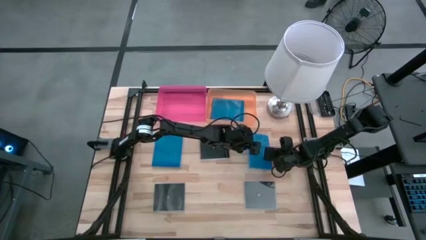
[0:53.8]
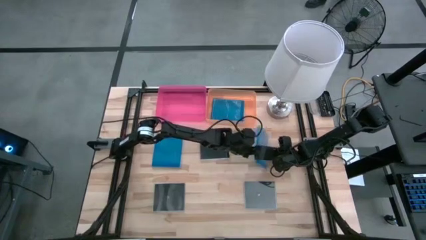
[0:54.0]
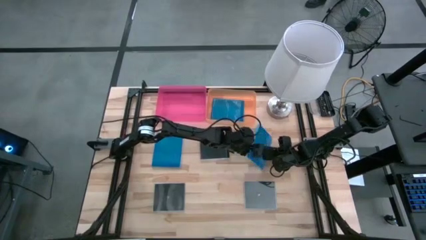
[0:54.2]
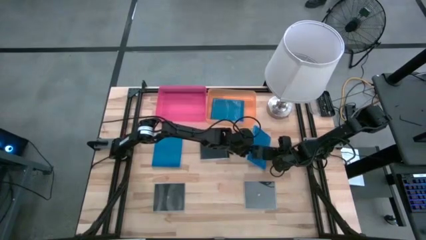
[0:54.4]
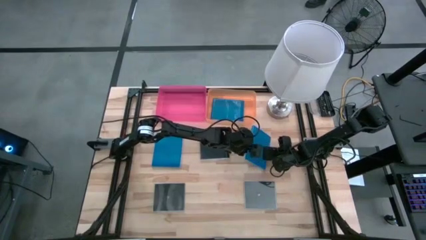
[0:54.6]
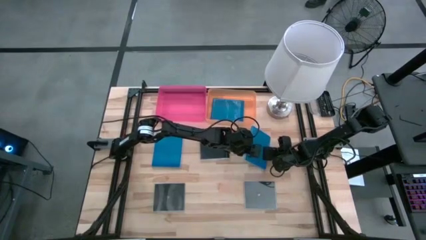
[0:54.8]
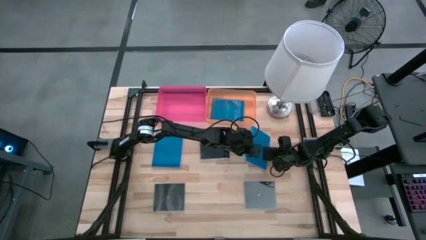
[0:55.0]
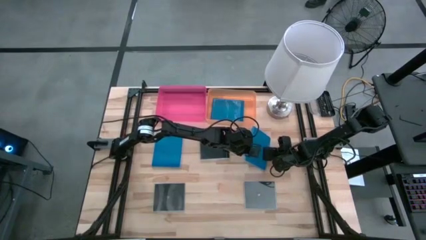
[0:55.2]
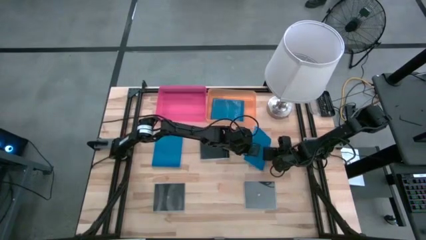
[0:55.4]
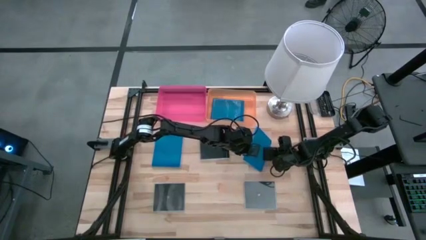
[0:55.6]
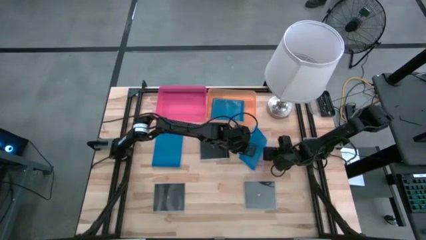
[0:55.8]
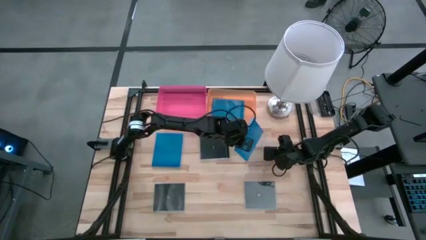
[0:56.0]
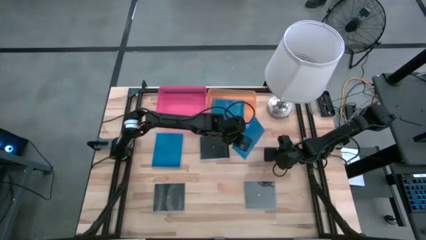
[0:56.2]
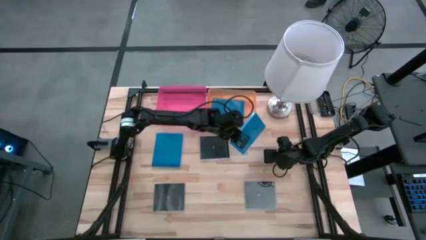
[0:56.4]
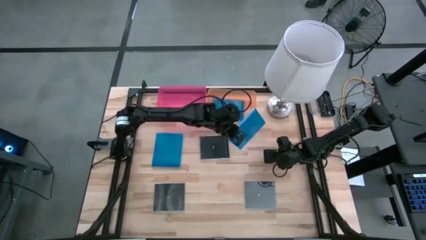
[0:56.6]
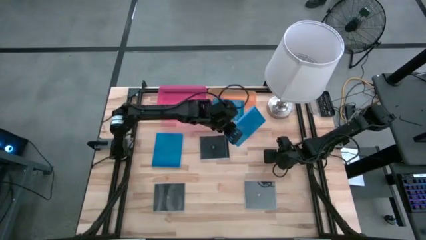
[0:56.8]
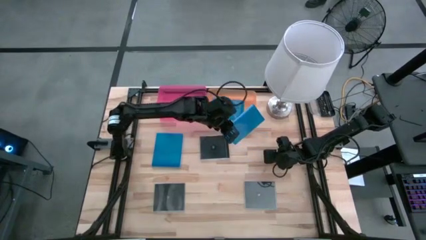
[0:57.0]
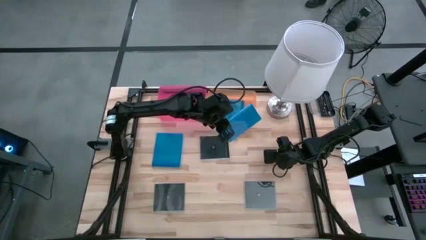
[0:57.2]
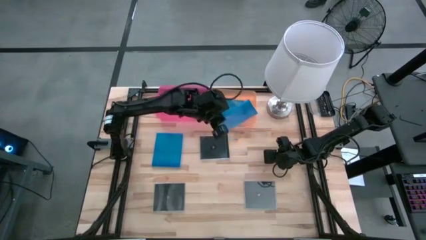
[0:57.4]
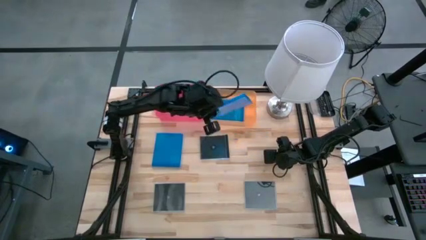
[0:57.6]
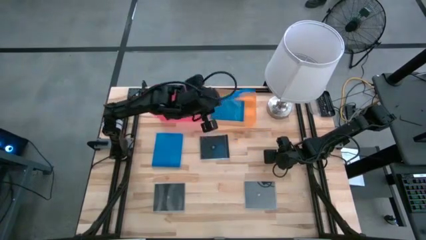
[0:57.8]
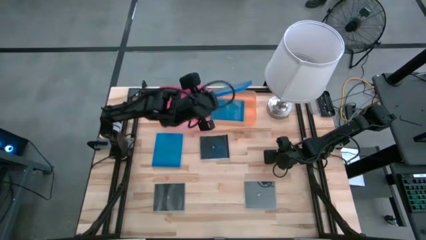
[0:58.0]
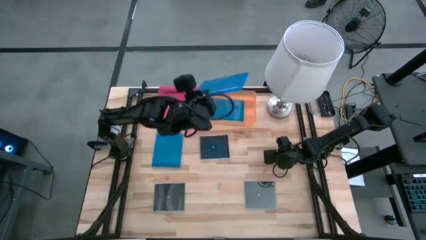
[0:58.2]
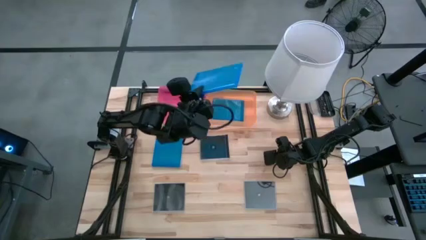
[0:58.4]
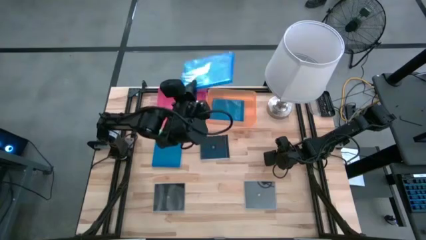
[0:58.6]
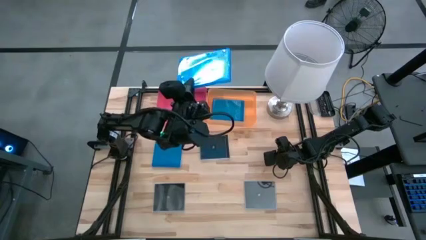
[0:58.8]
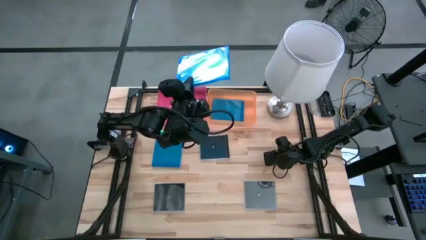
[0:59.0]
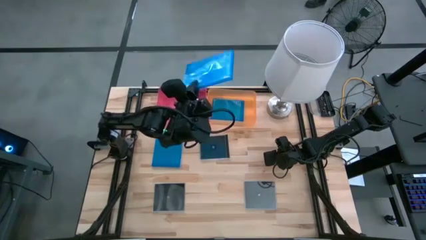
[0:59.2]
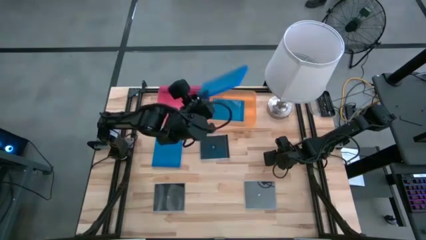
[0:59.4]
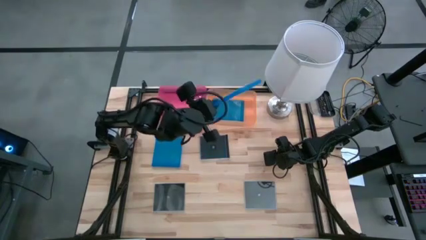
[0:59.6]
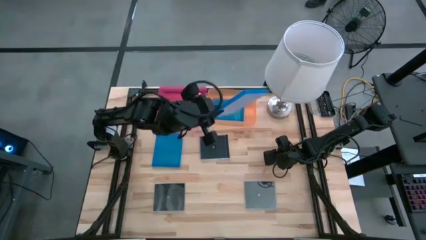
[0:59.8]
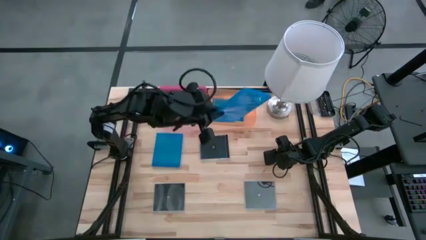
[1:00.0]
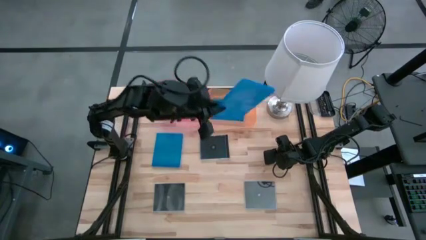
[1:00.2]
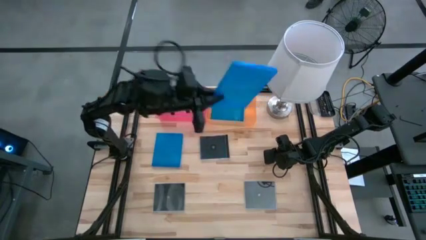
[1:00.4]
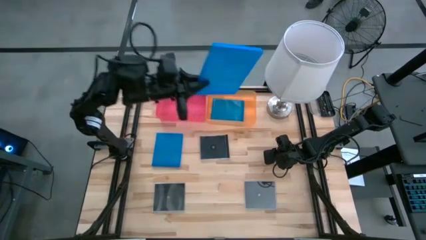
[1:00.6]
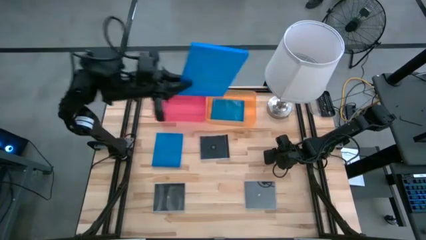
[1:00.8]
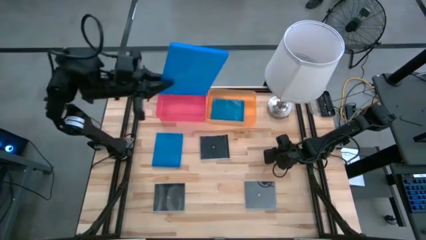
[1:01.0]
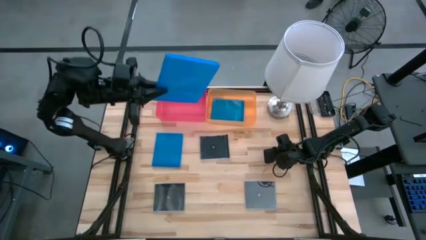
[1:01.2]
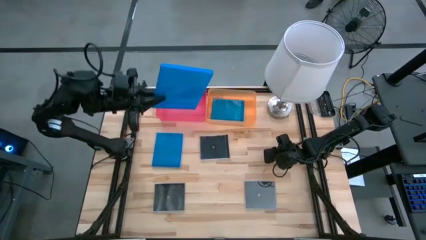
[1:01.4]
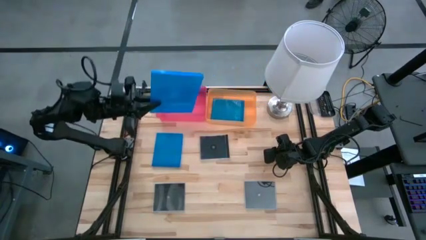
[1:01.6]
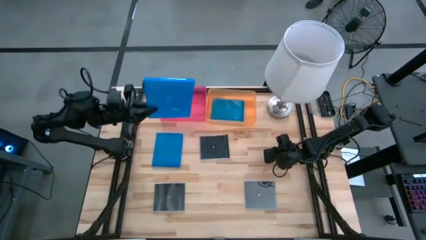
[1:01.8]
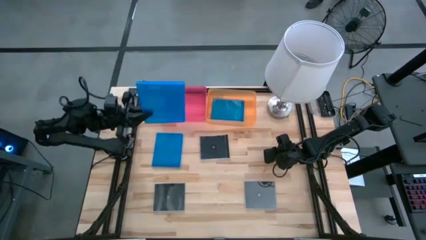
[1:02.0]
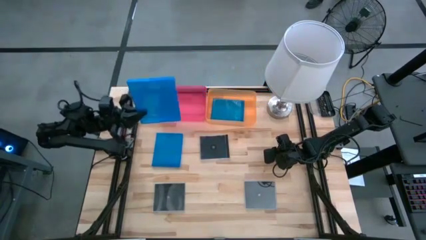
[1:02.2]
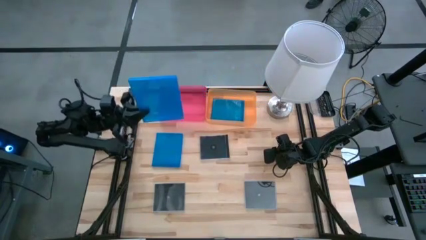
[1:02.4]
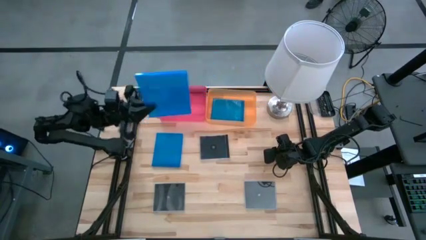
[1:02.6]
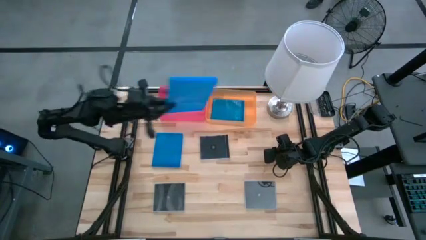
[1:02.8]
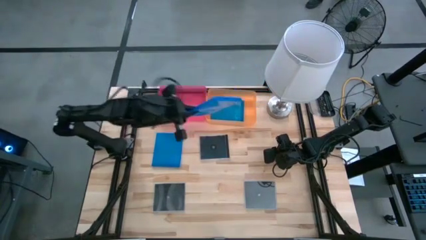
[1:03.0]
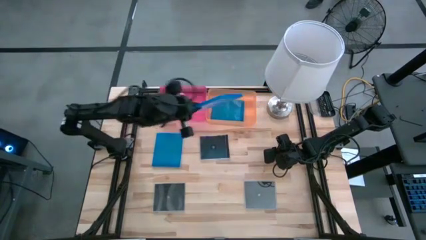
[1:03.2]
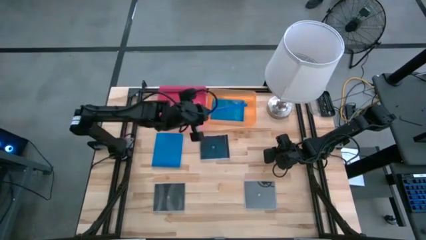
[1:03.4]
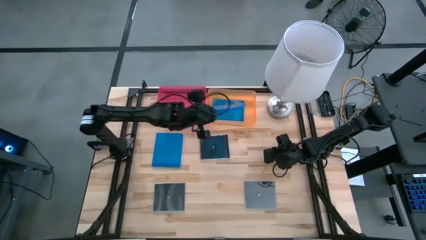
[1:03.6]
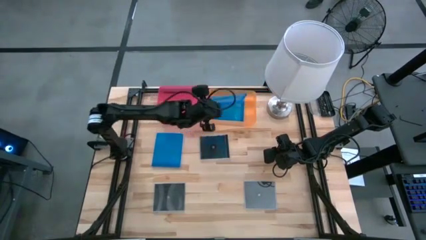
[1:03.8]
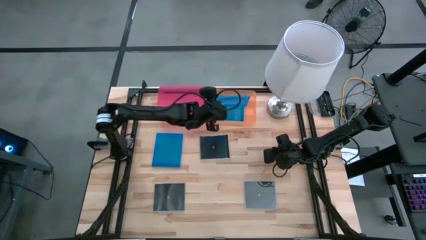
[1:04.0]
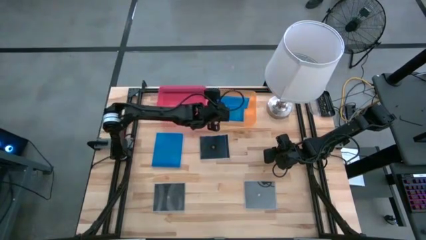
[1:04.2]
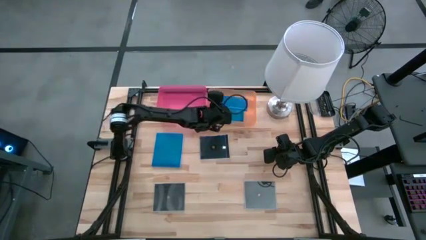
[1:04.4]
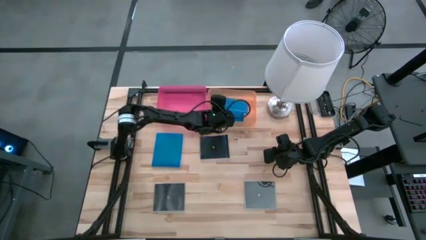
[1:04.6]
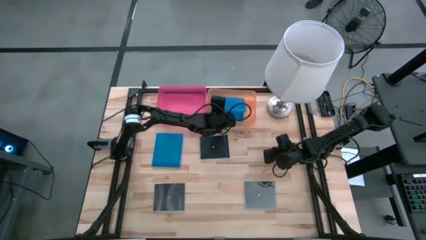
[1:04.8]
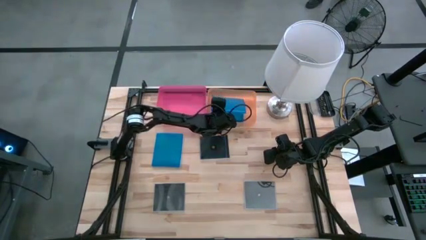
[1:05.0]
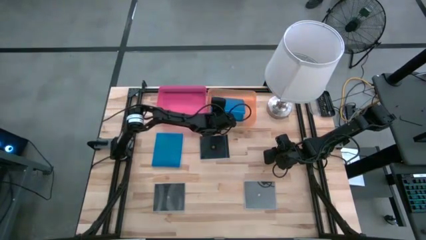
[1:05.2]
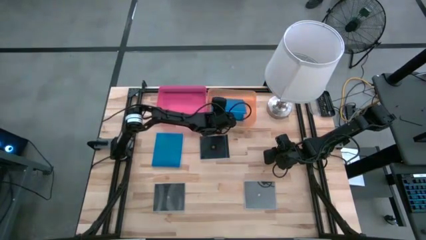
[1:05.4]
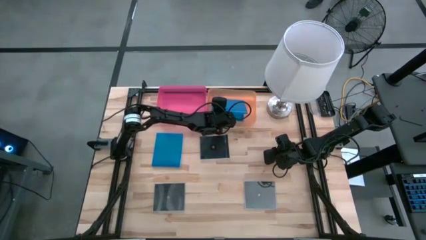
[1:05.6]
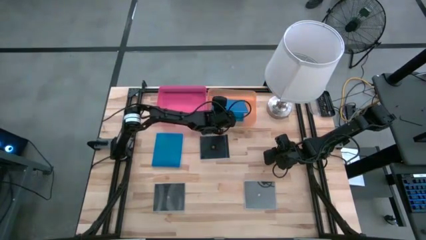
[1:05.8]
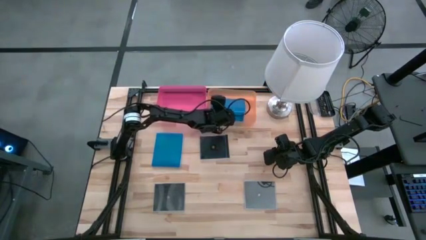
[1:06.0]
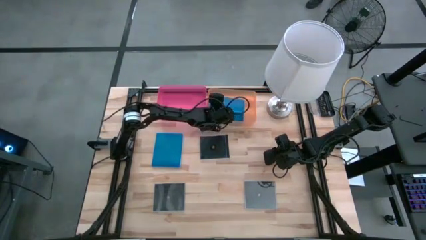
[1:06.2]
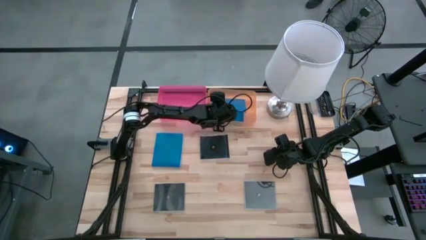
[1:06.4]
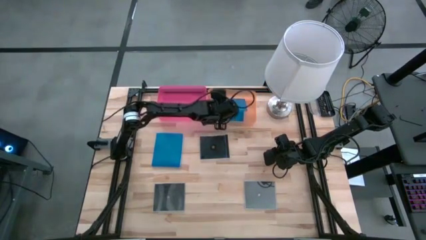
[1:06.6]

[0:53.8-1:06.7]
Task: Pick & place jewel cases by type
Put the right blue CD case into the orange bin
